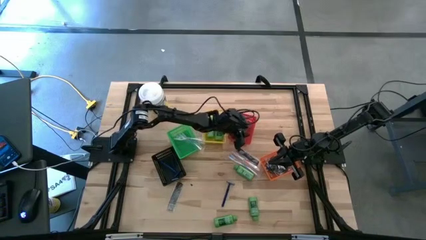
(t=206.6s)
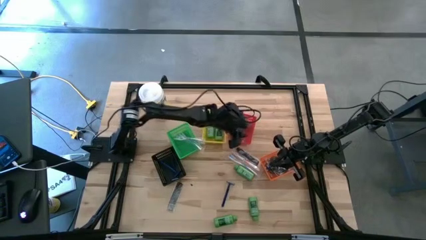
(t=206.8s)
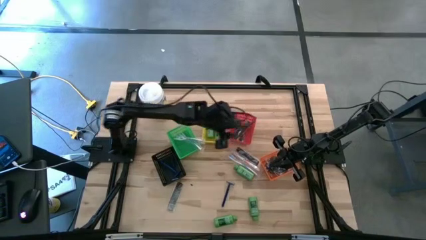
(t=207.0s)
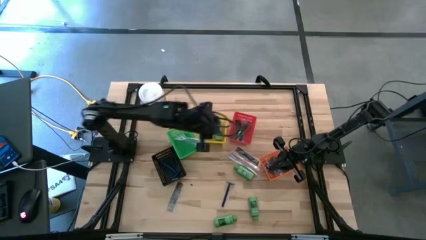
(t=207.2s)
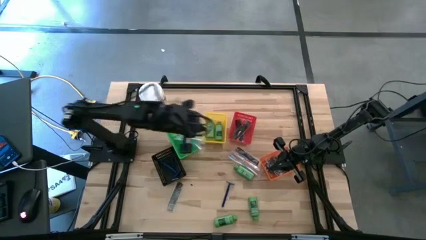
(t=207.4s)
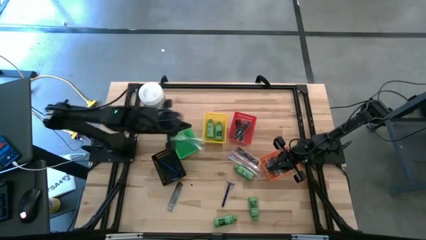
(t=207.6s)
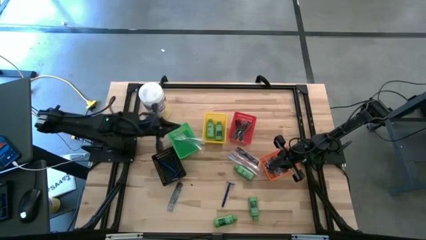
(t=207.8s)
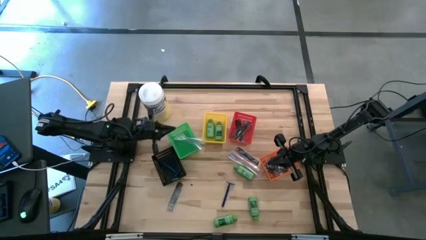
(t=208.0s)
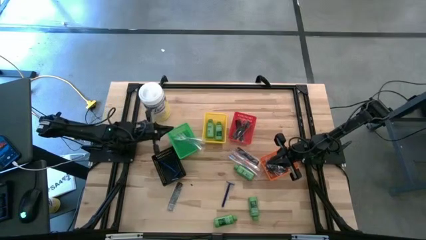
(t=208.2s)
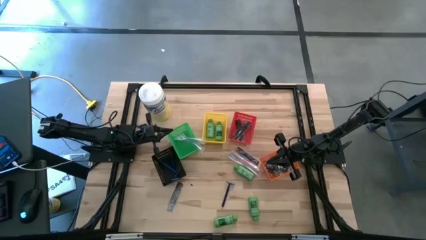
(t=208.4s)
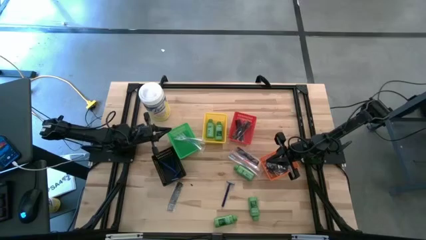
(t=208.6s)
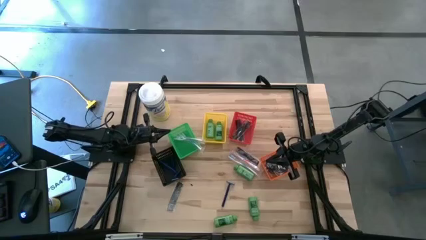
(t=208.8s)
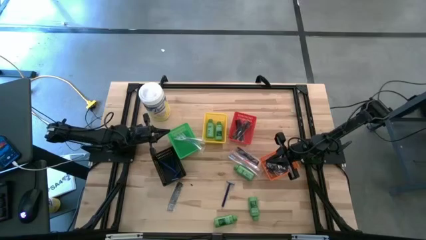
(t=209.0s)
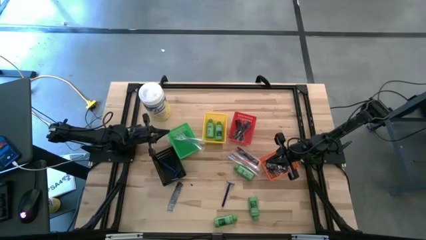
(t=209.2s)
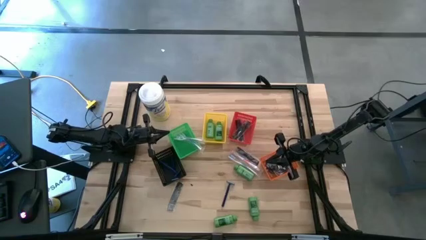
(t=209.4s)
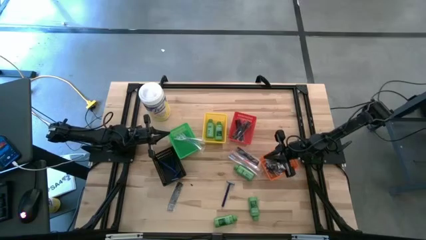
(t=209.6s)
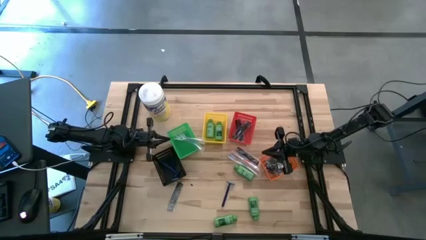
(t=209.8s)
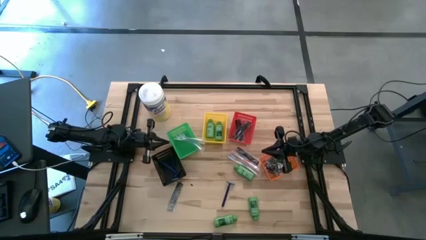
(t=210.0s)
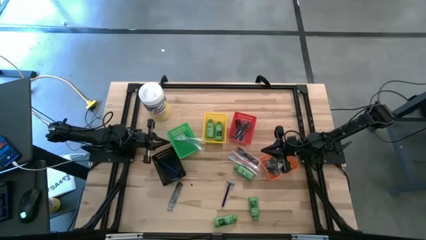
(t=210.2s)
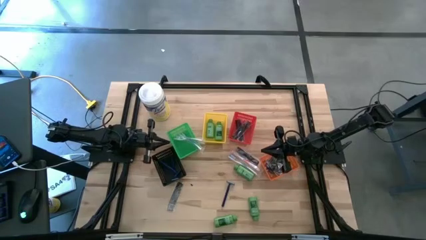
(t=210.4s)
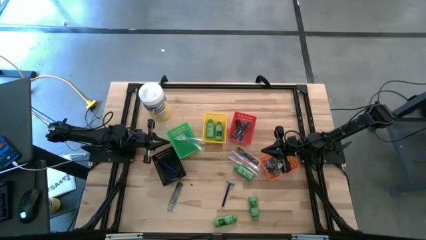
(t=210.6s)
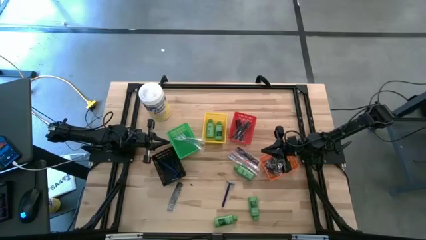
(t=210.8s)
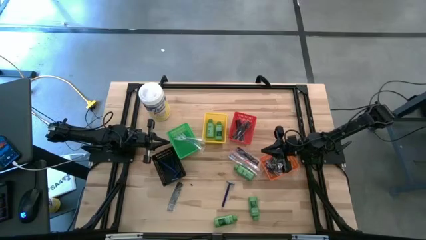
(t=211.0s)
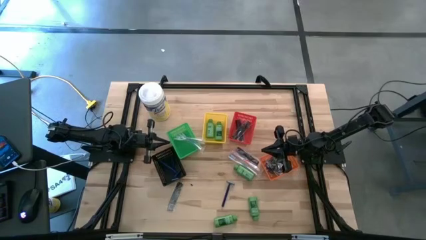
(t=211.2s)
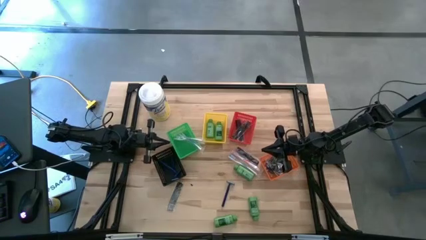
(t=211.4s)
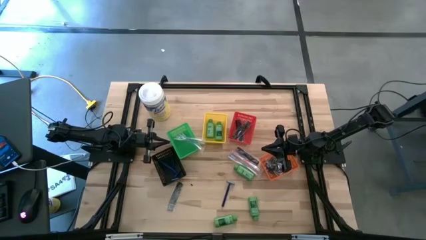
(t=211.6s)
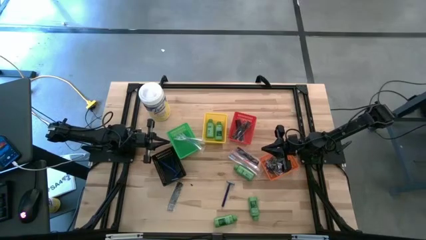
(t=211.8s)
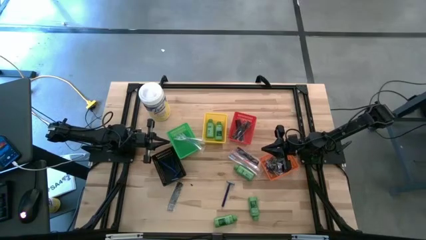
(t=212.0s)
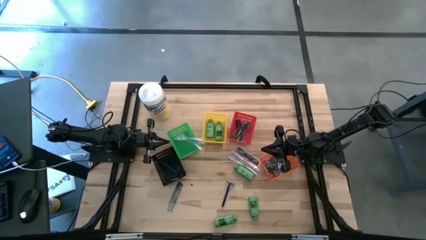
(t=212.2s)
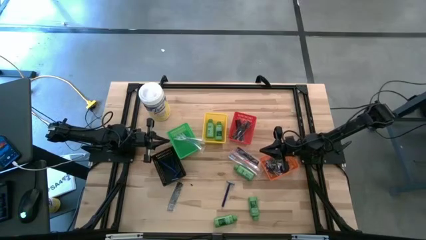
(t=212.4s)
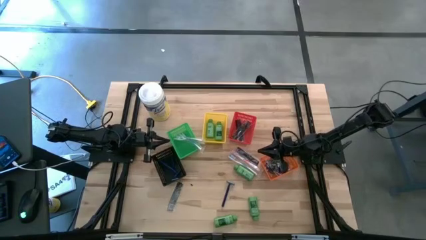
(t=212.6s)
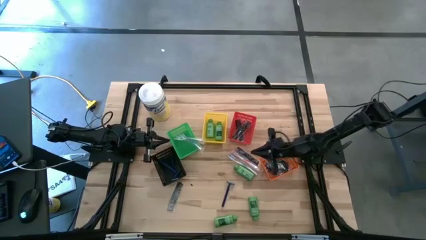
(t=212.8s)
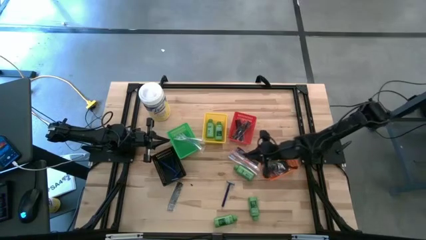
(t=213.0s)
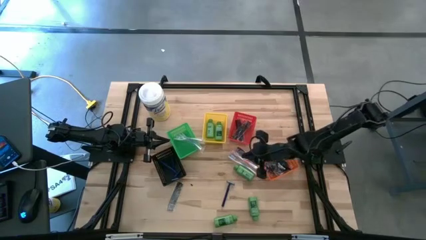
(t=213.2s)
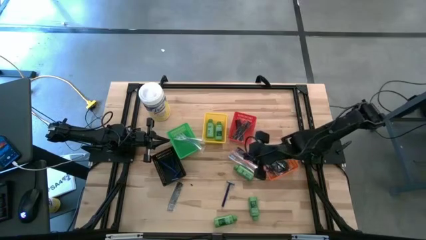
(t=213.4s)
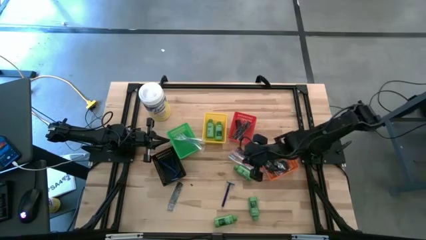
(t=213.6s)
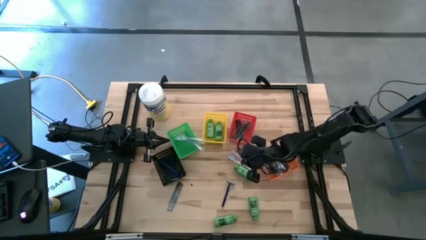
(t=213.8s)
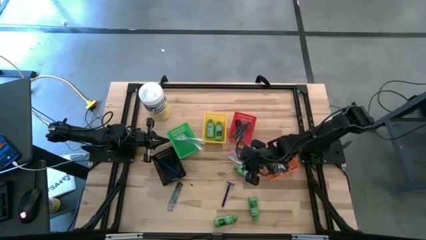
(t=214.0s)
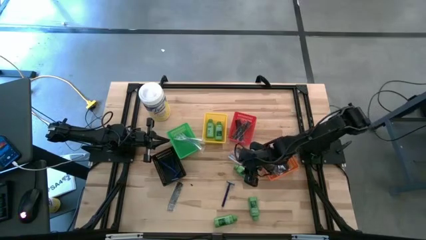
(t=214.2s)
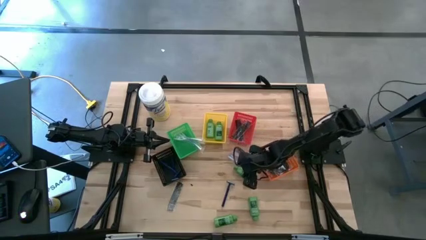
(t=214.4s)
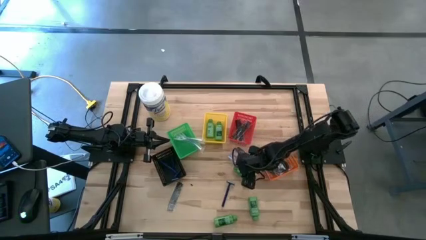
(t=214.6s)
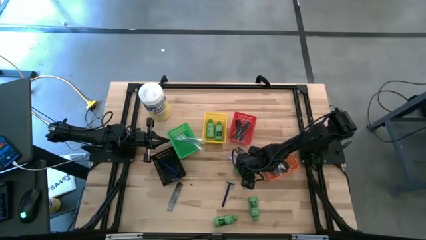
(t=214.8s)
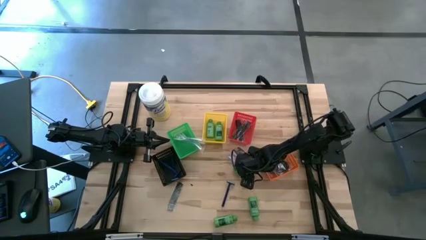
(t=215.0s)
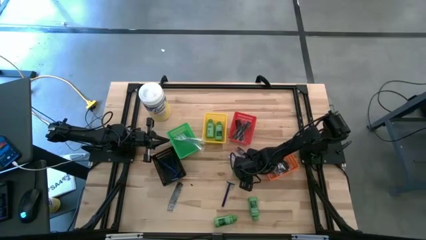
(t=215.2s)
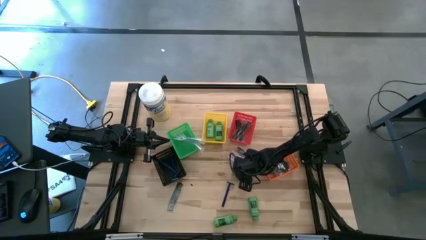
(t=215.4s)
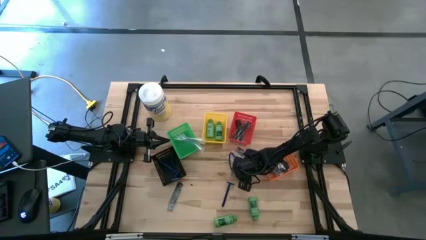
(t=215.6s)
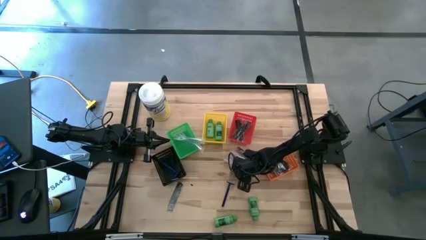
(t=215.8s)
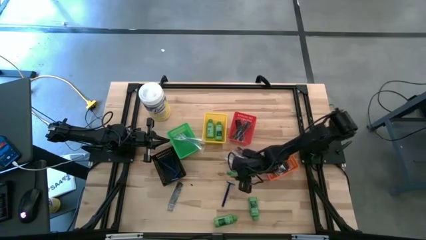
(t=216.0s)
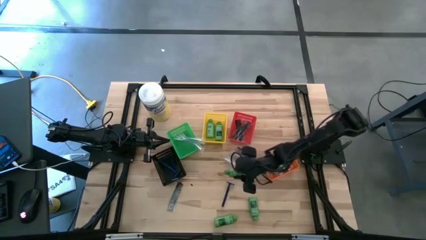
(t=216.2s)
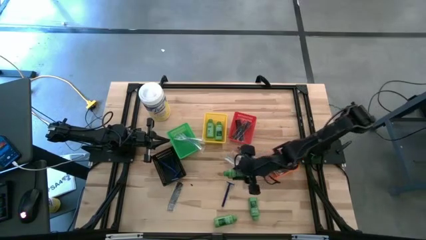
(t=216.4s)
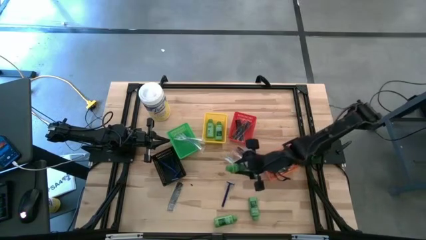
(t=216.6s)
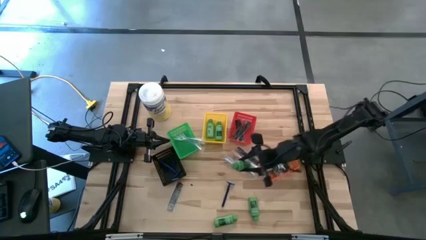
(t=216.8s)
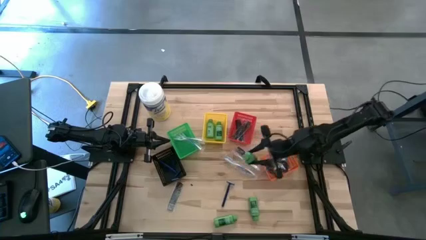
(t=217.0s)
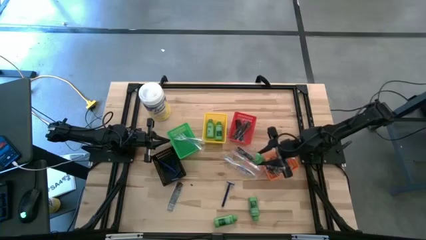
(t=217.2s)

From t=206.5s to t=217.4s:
Task: Pick & Place Travel size toiletries
Put the green shampoo into the yellow bin

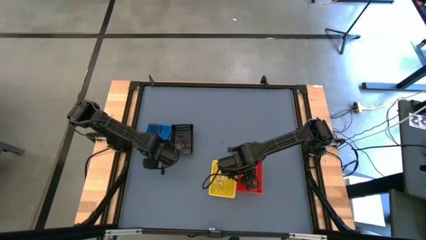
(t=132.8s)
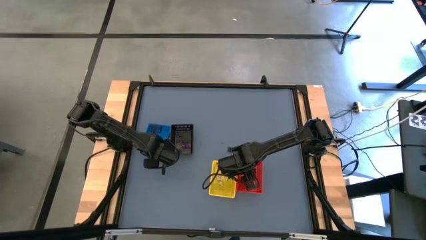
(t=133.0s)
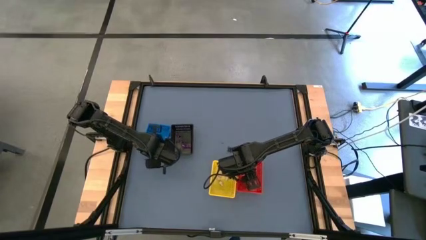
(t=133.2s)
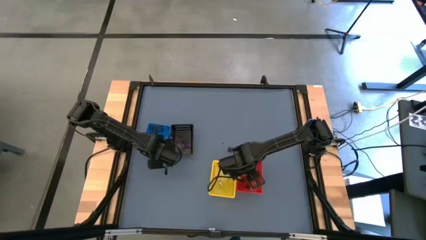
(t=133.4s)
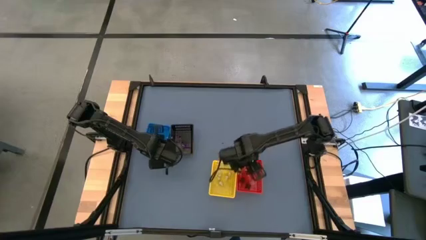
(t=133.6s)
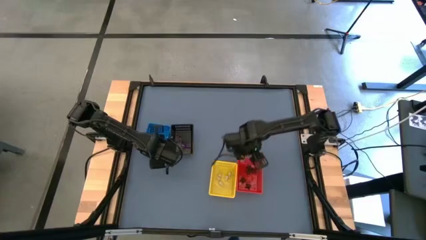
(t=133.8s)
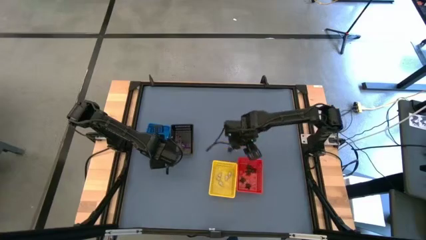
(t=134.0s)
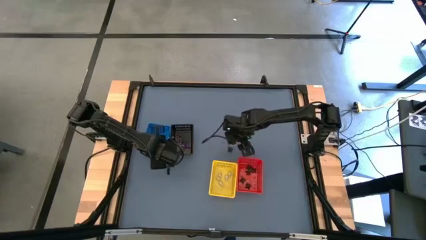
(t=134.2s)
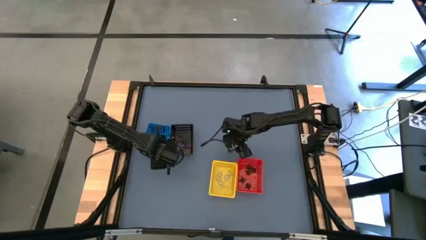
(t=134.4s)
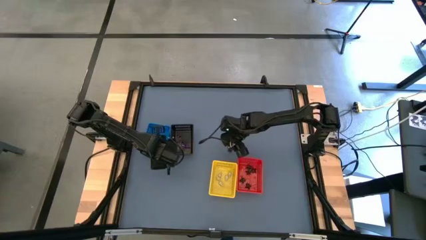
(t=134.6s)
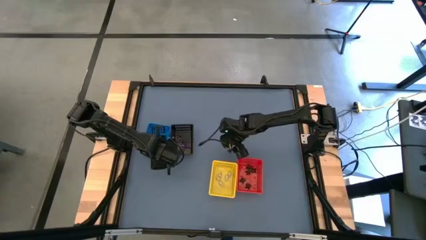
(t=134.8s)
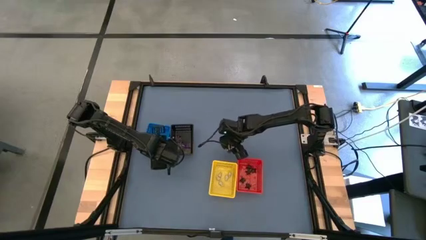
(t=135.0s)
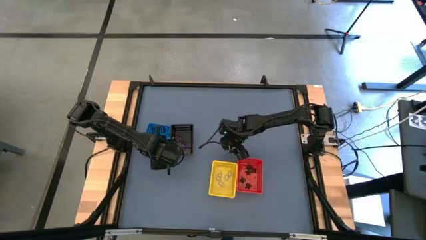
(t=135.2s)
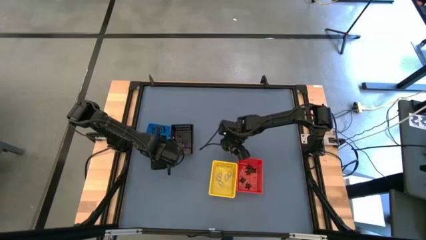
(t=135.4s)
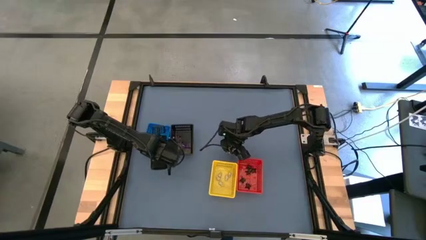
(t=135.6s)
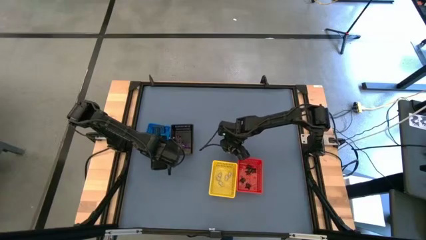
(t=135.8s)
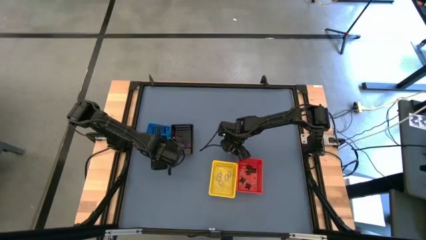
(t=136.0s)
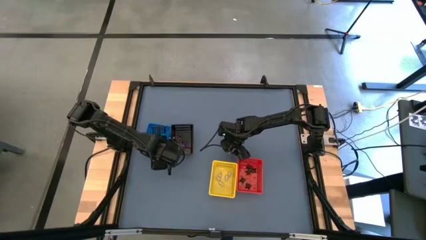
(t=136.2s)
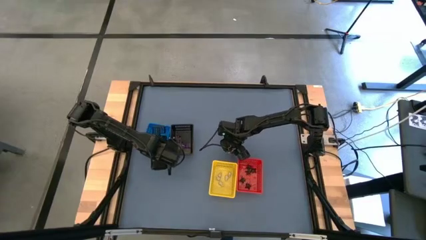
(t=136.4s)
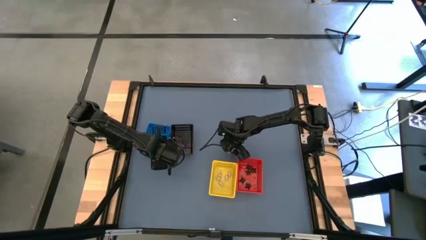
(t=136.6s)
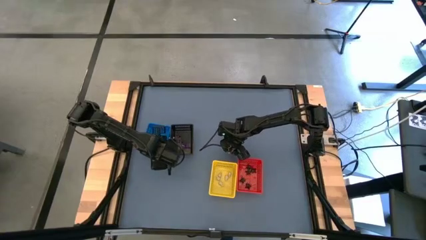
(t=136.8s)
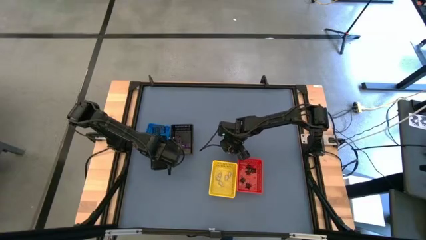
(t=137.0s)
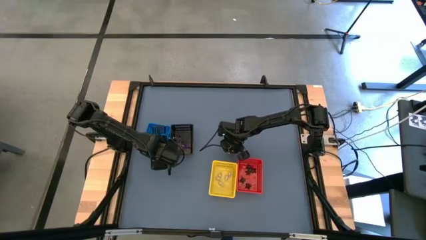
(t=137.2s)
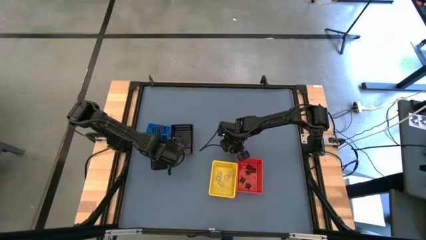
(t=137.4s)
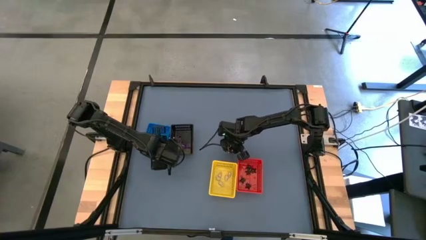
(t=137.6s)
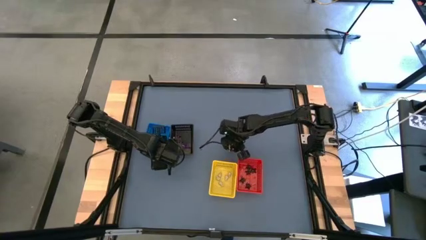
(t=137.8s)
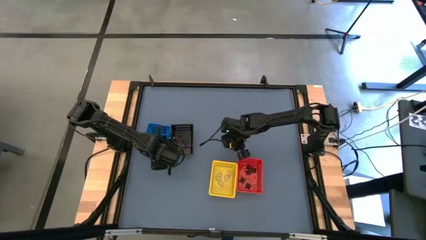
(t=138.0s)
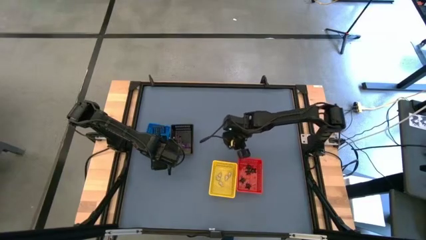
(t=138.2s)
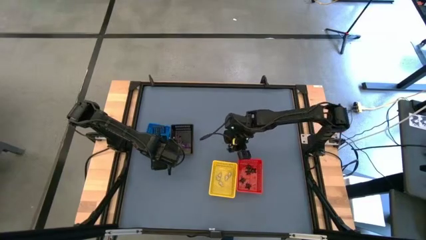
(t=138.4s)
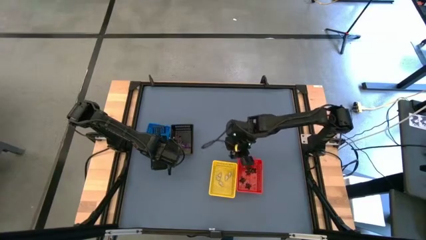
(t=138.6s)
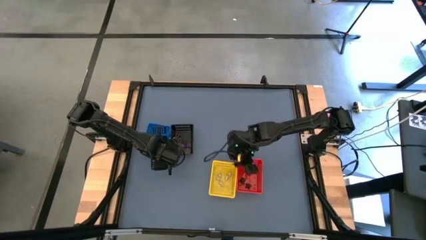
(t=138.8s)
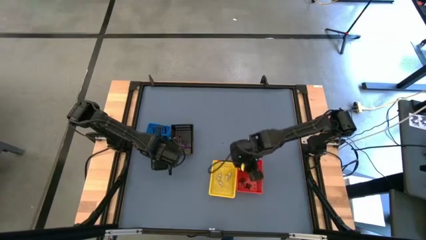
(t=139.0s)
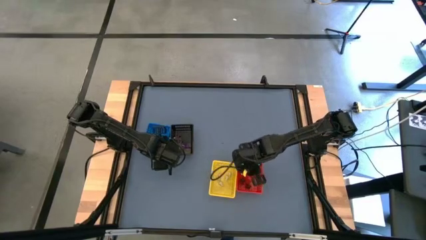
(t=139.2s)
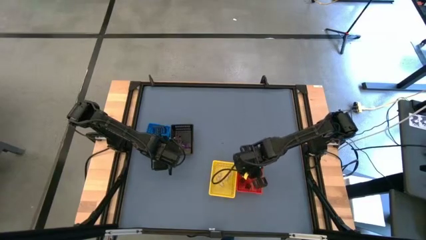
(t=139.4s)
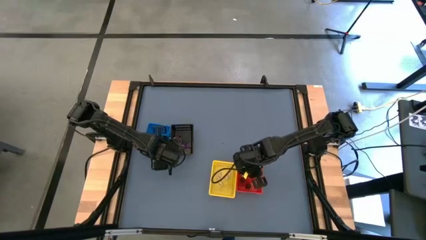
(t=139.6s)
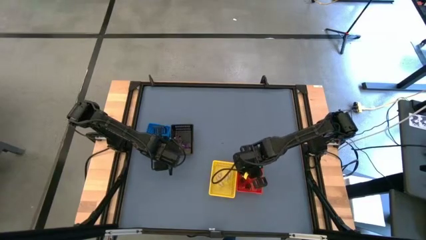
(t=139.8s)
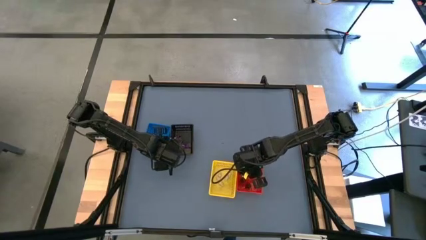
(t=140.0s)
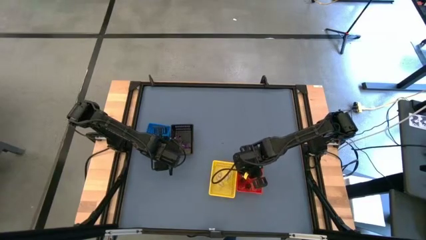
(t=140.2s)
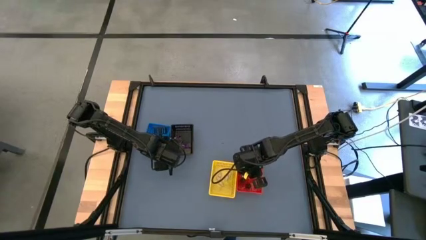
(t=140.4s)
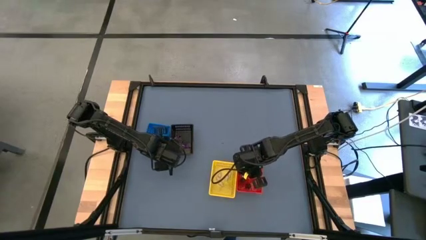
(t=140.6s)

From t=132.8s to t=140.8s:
Task: Sort Halloween decoration
Put the spider toy into the red bin
